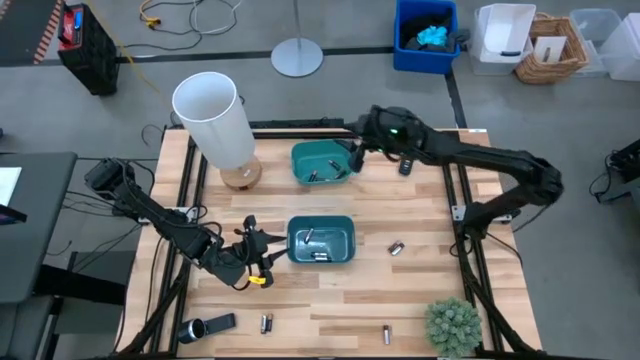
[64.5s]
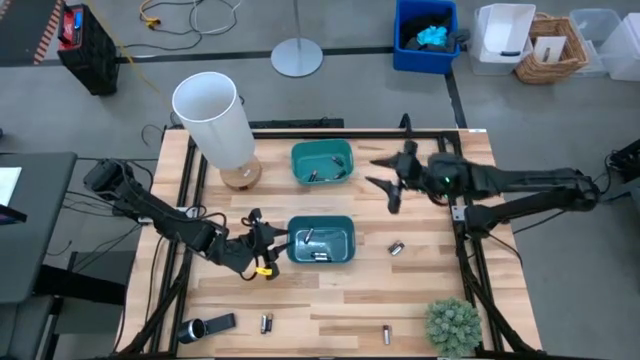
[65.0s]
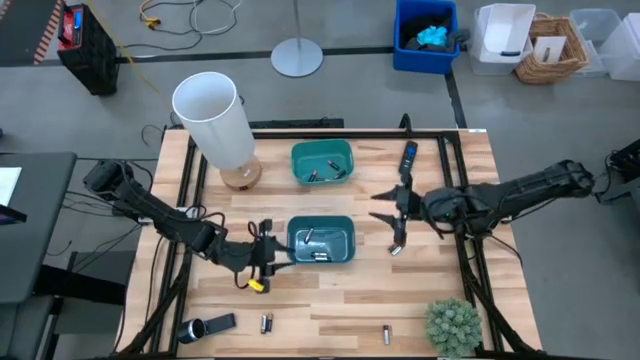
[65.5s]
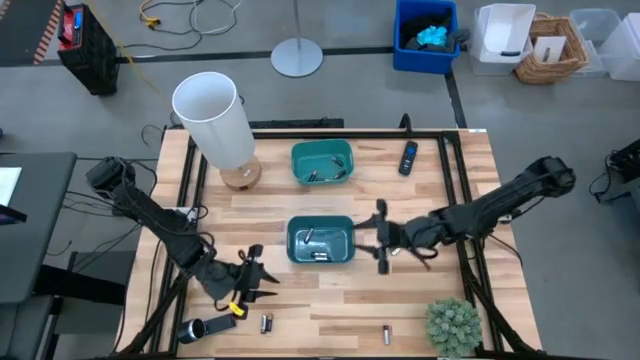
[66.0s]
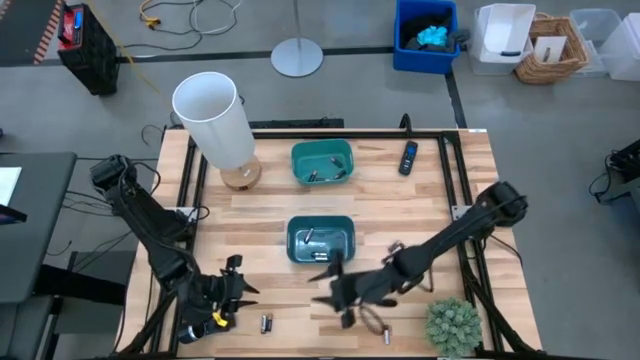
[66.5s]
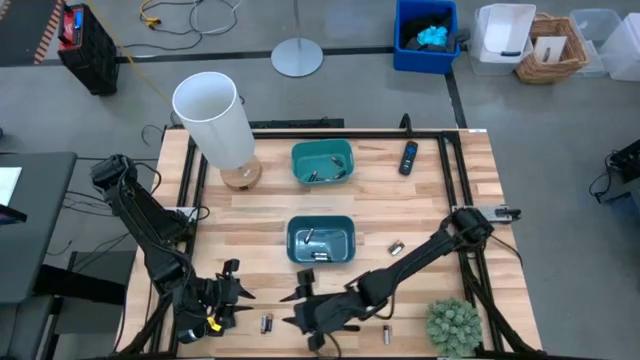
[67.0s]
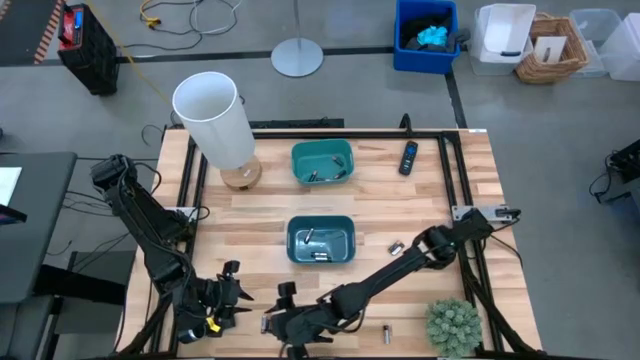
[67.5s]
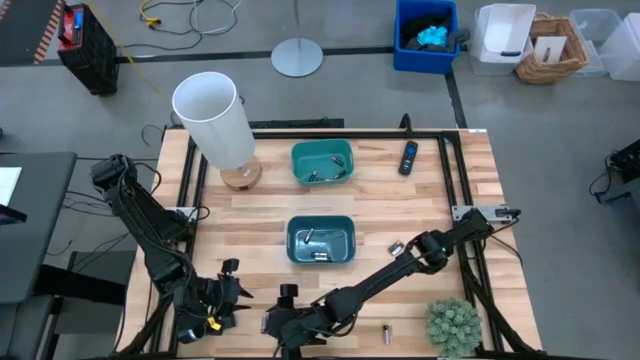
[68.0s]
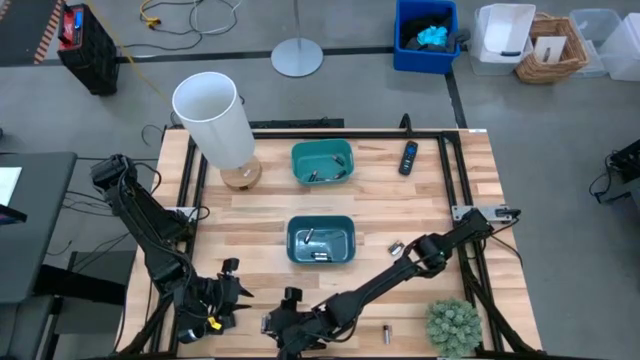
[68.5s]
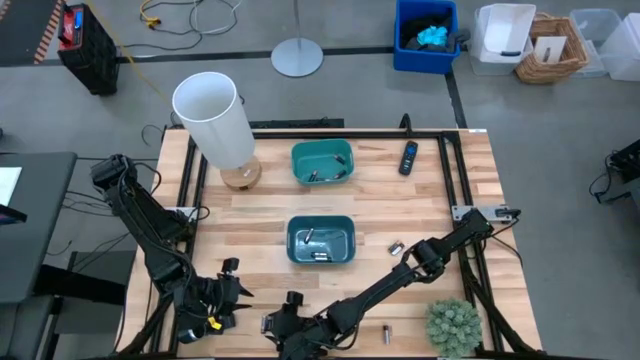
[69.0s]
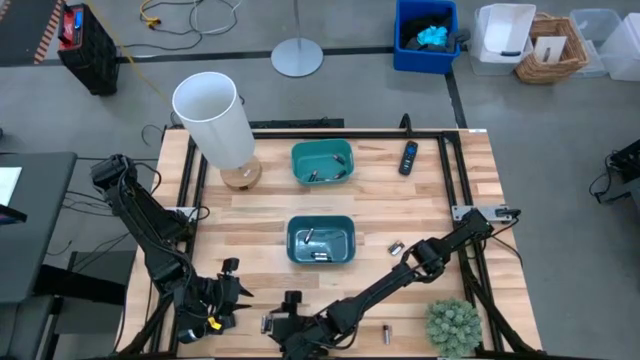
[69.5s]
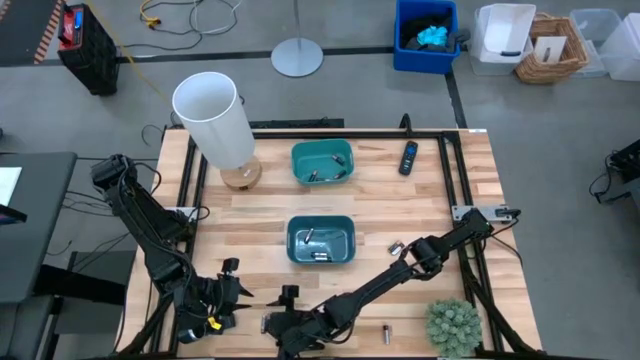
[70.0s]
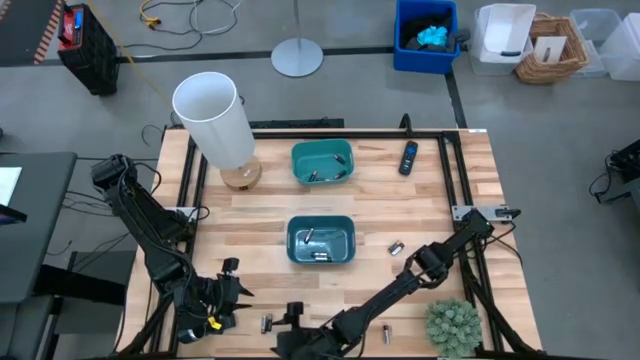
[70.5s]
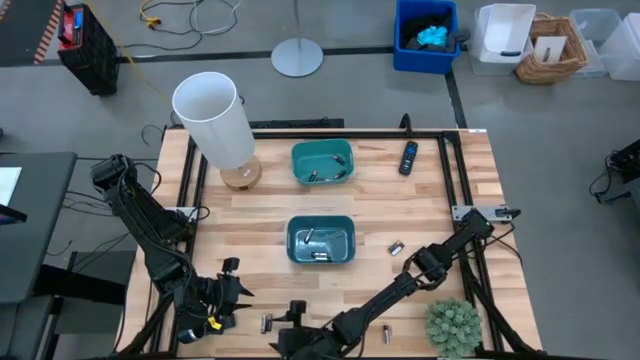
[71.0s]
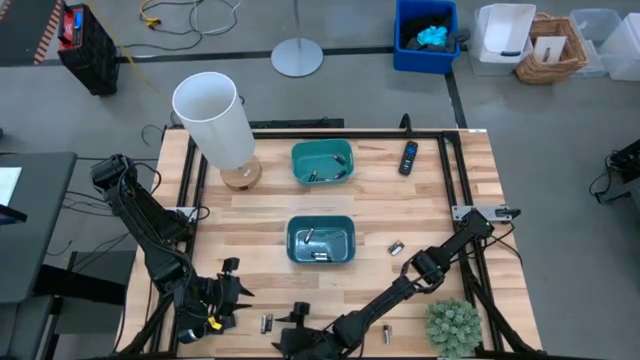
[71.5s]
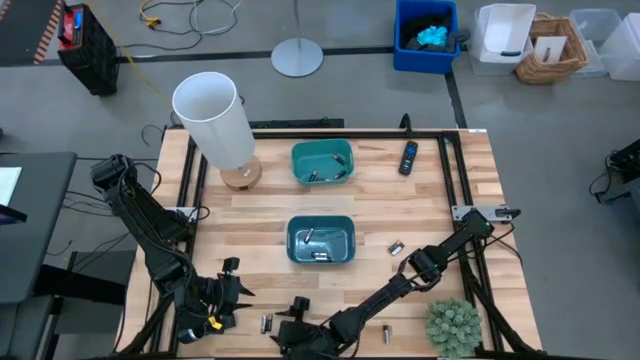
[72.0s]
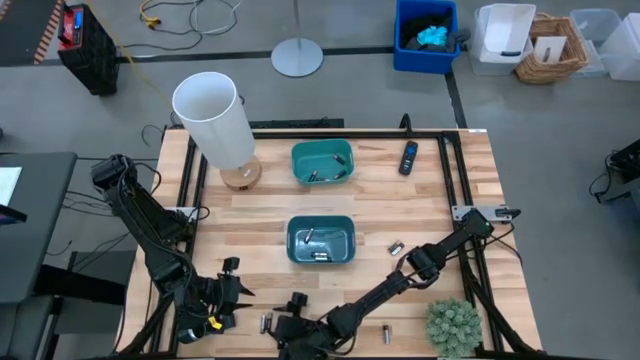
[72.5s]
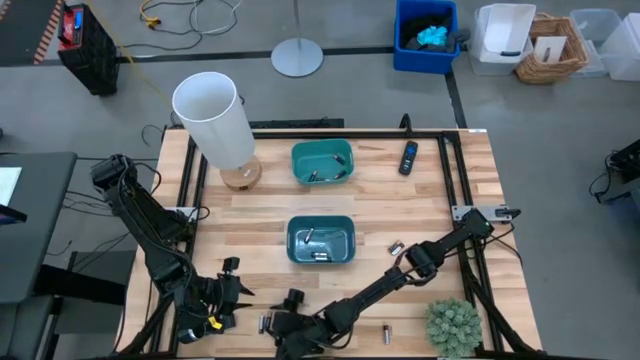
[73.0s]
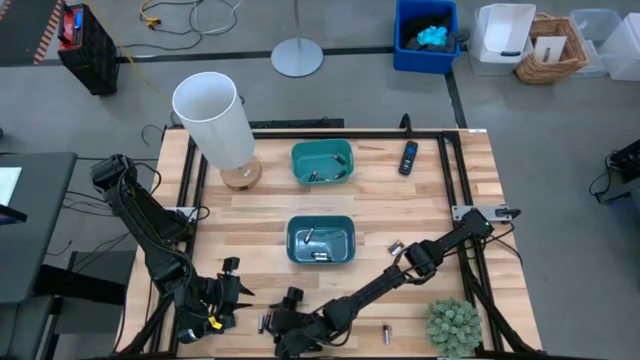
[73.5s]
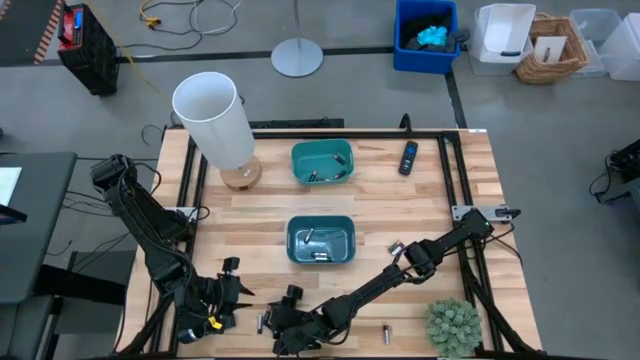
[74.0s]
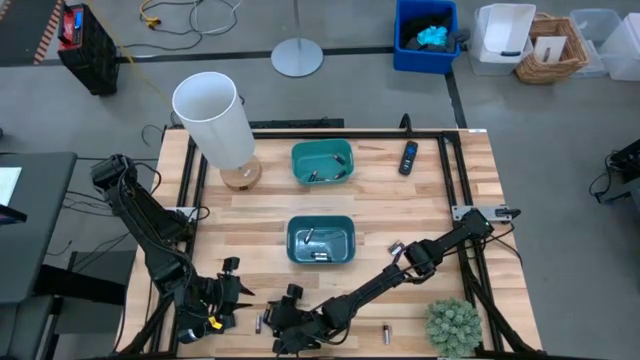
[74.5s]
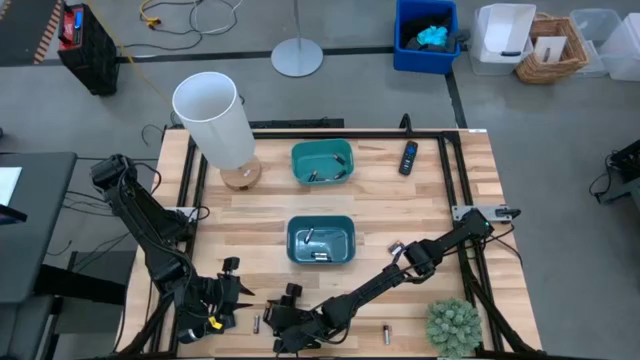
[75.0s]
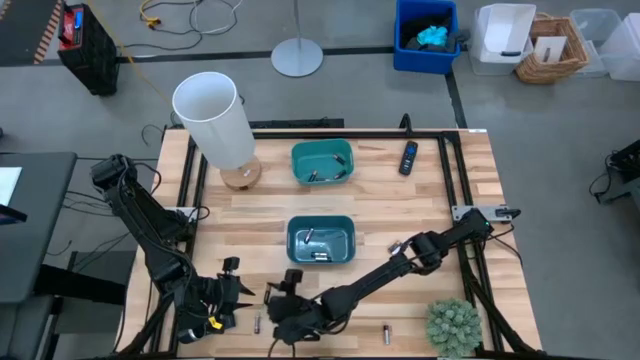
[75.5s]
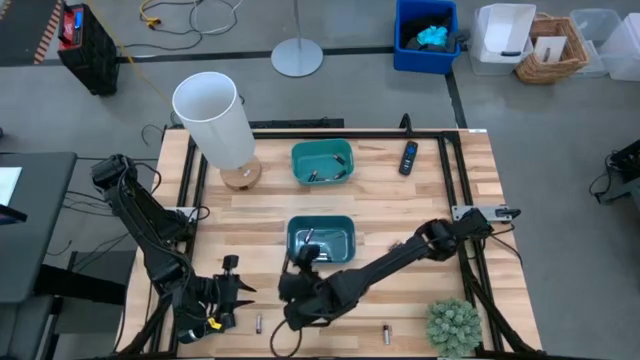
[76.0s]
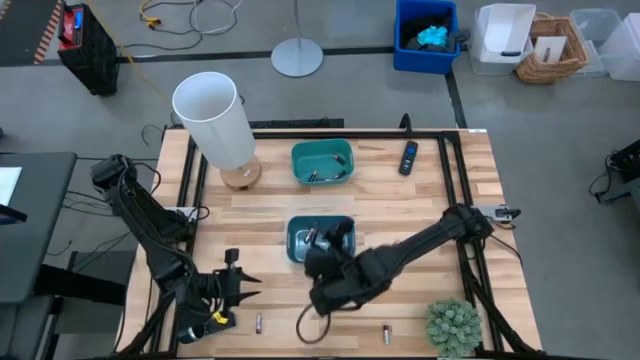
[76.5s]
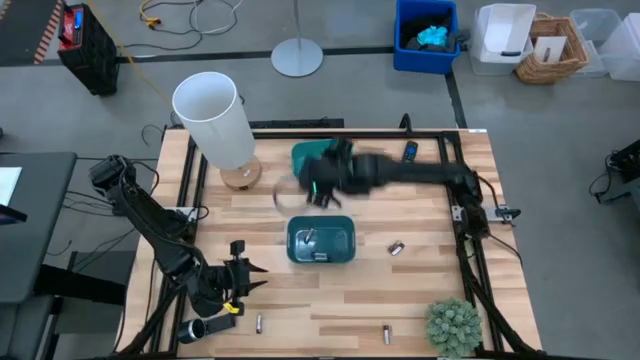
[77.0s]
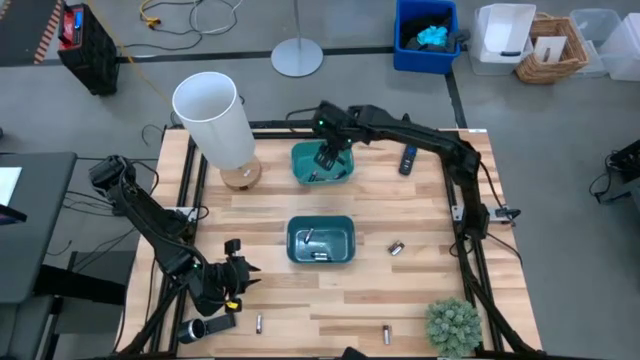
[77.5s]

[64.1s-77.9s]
Task: Sort batteries
Put the black battery into the green bin

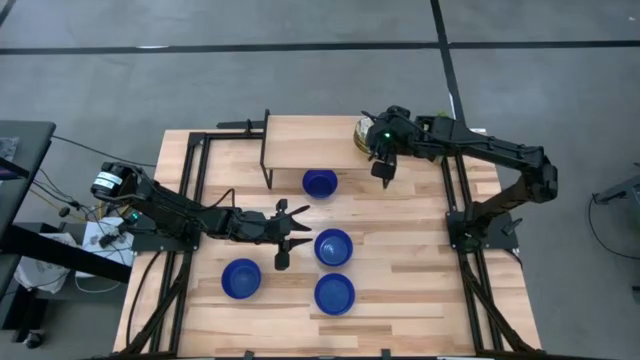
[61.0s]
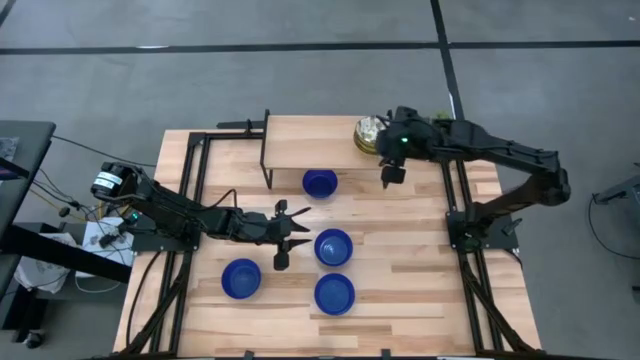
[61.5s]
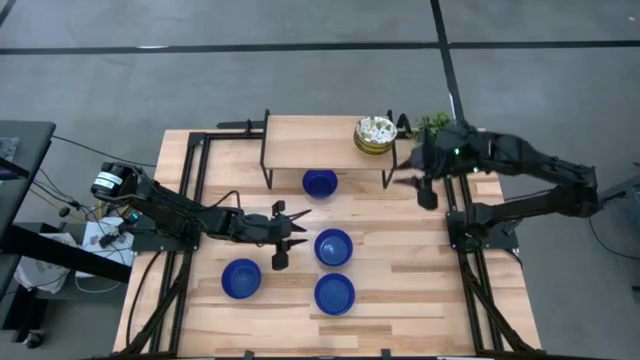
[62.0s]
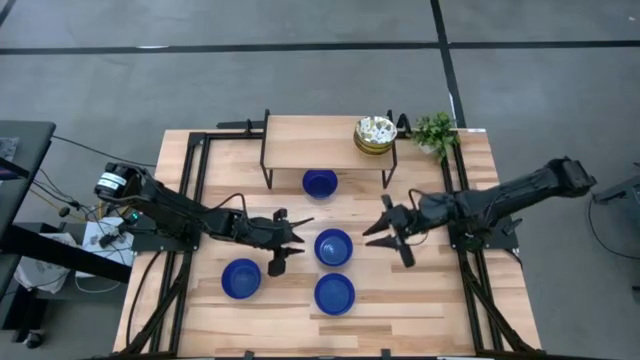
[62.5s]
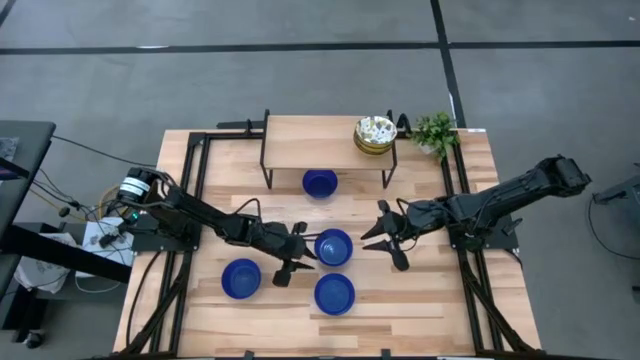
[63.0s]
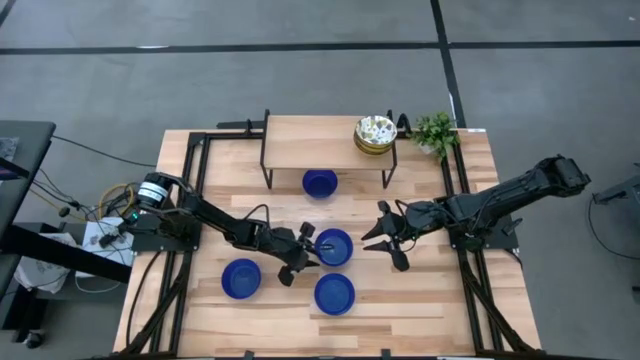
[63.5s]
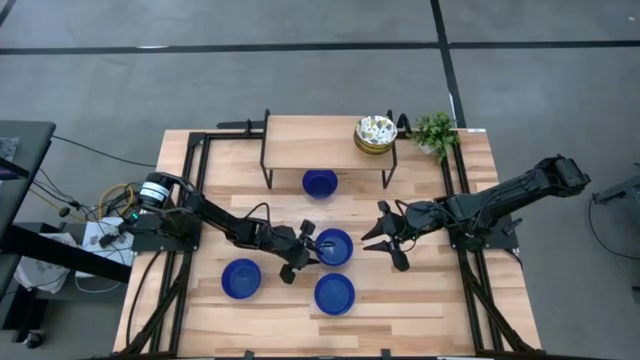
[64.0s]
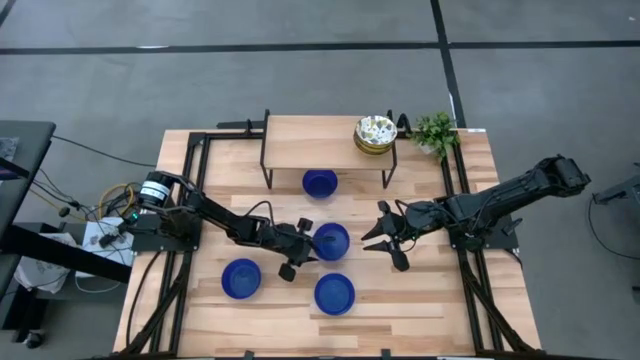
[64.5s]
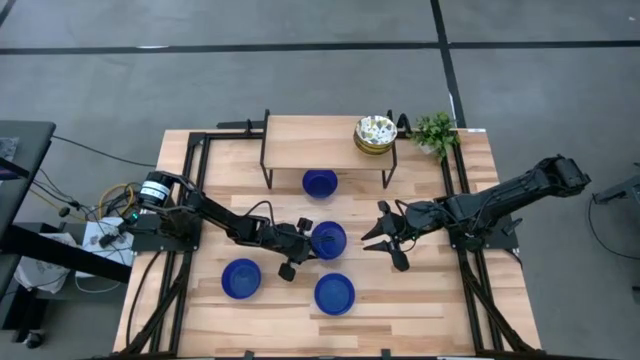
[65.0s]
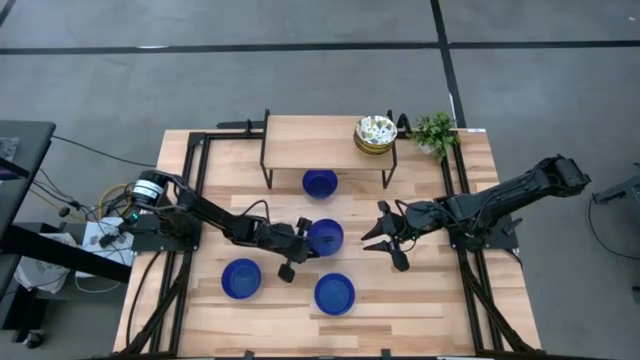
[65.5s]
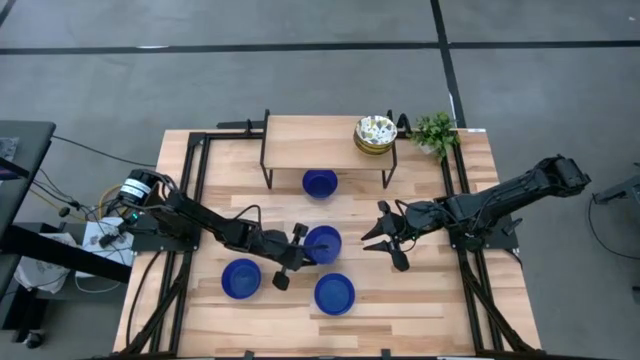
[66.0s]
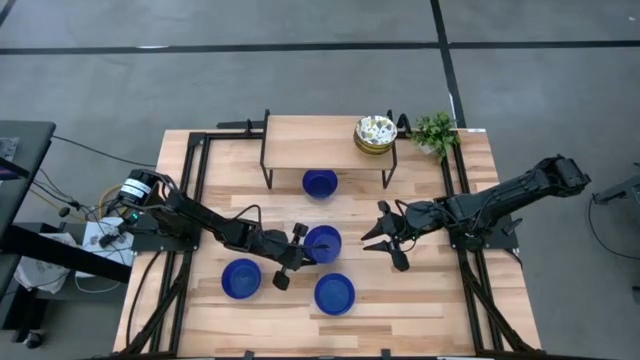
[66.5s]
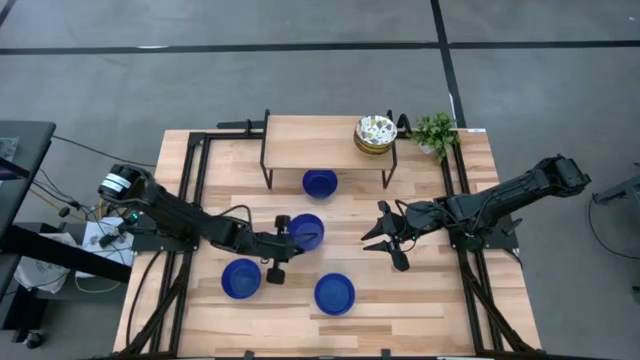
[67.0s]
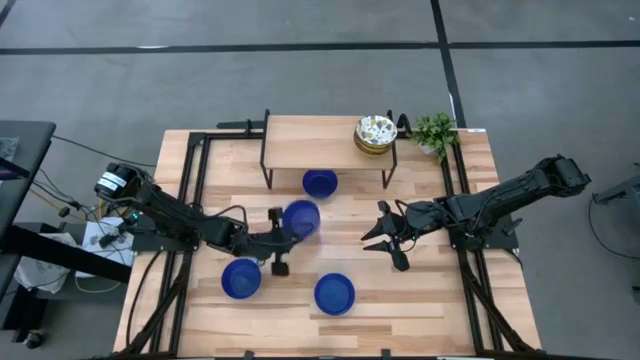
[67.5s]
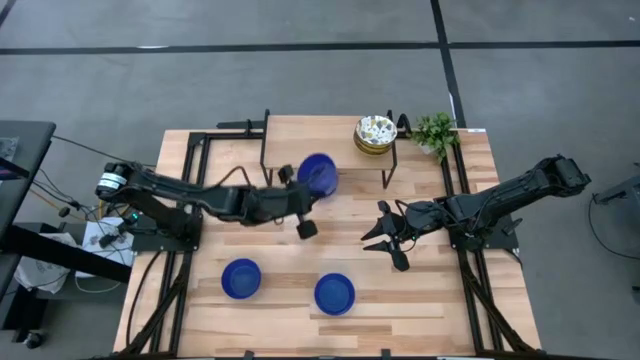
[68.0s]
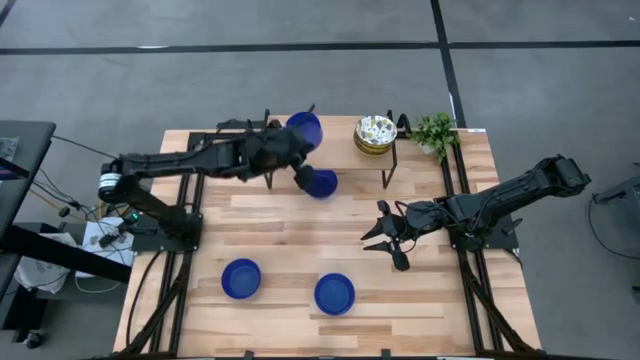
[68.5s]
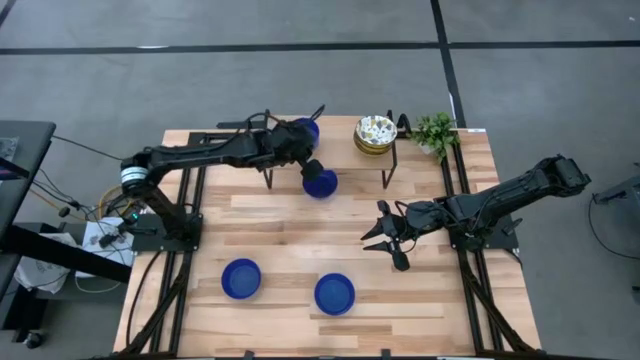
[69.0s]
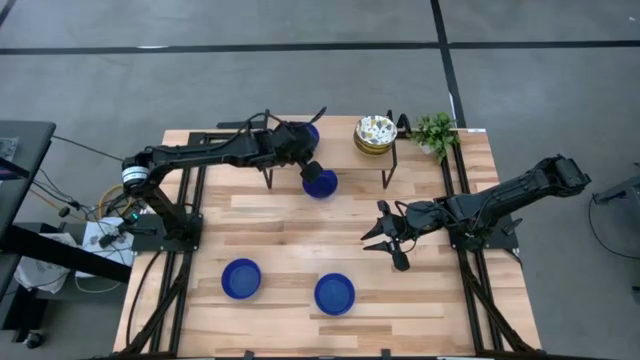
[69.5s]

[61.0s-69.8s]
Task: Pick & Place Mini bowls
Put the blue bowl on the shelf
